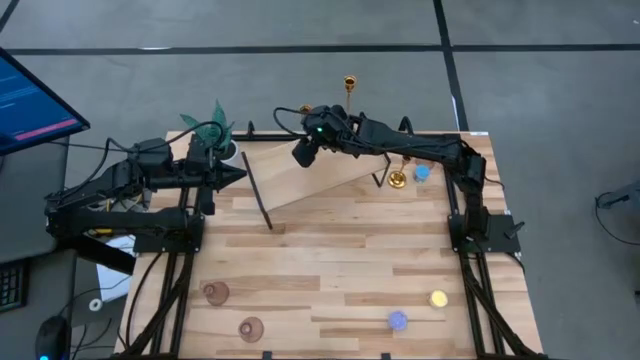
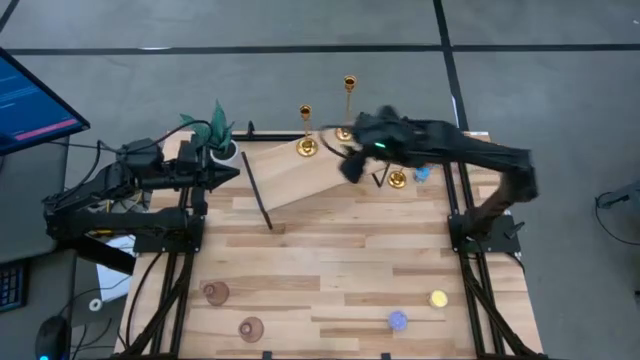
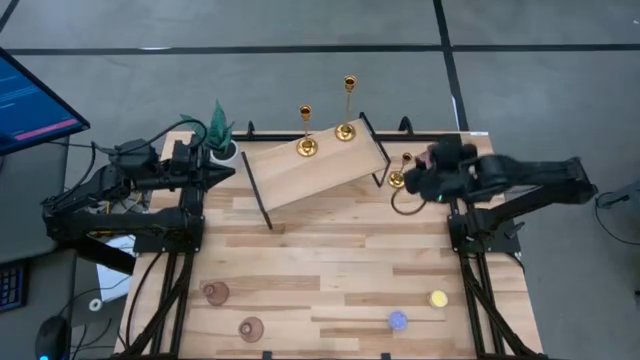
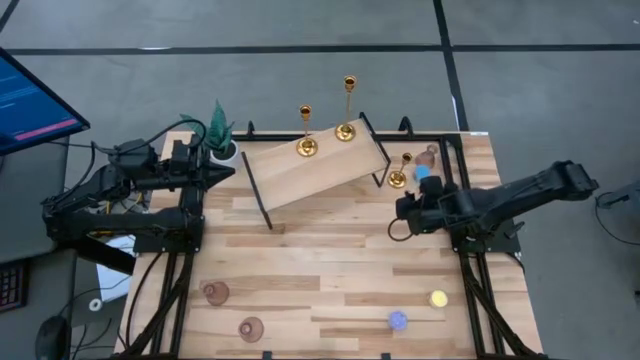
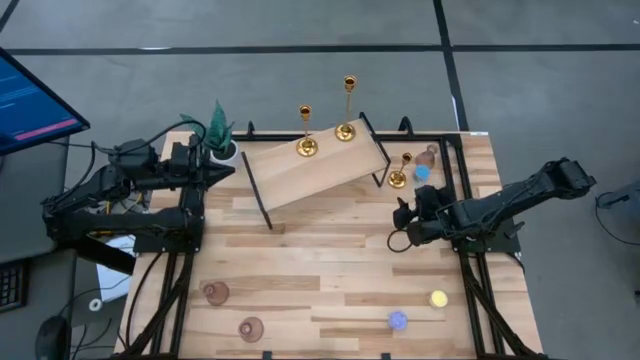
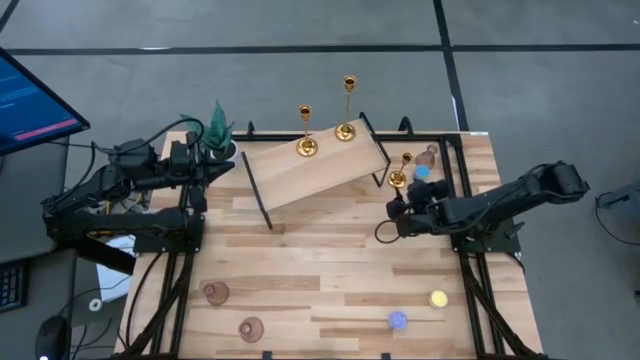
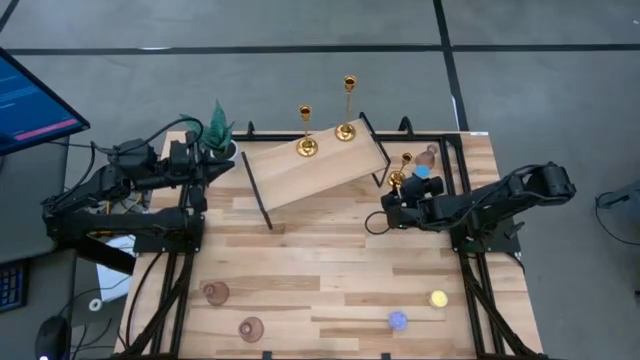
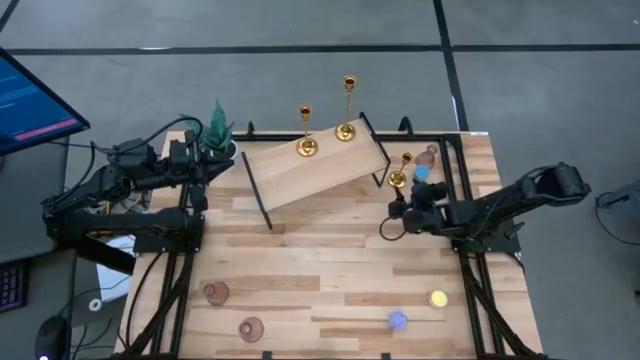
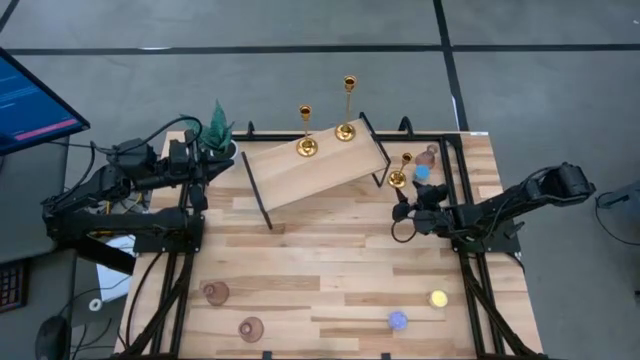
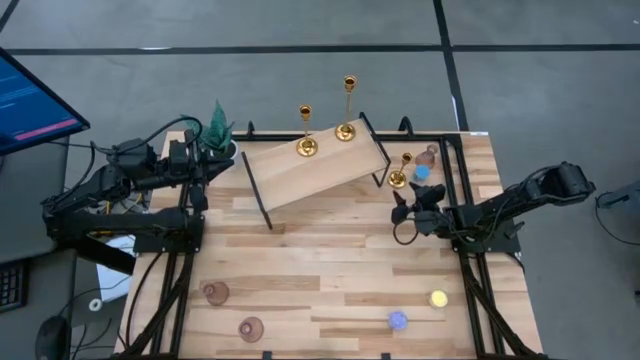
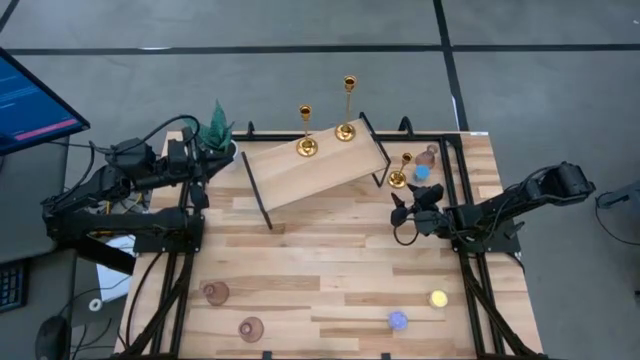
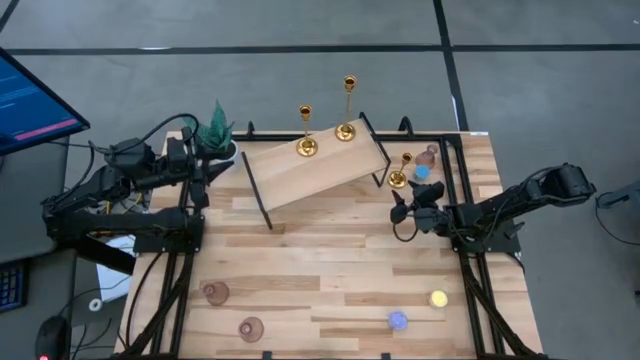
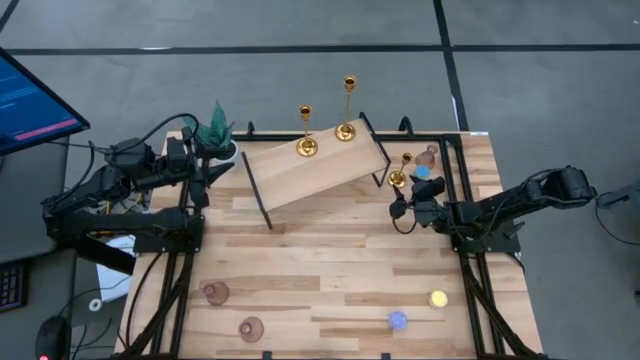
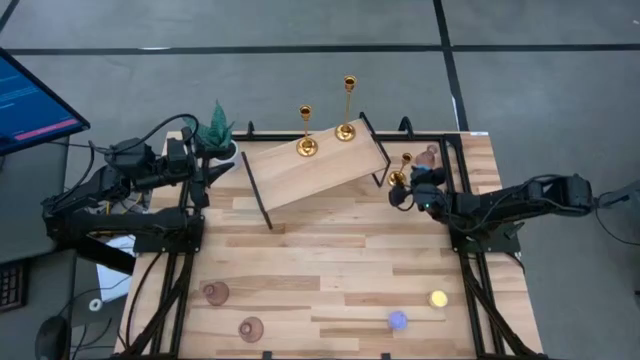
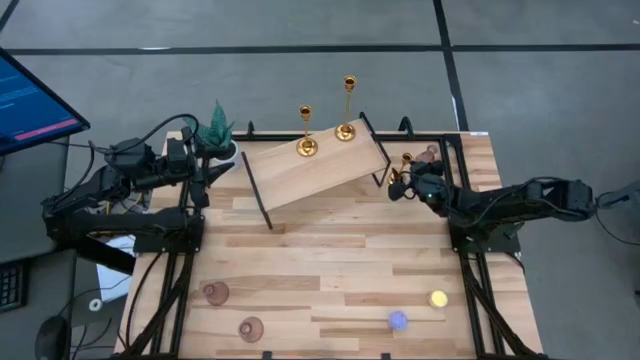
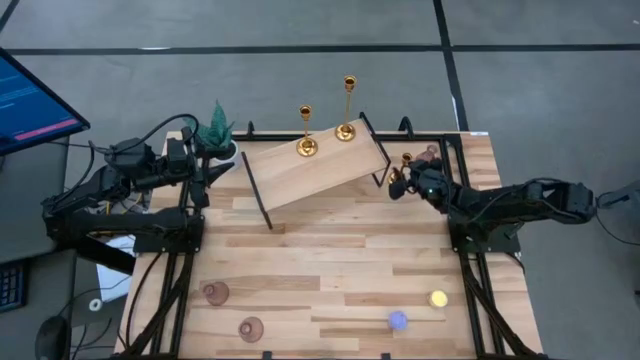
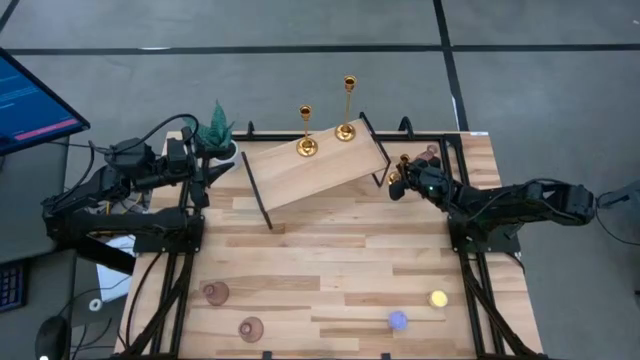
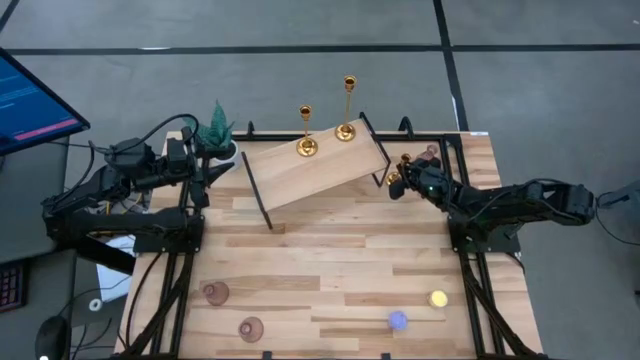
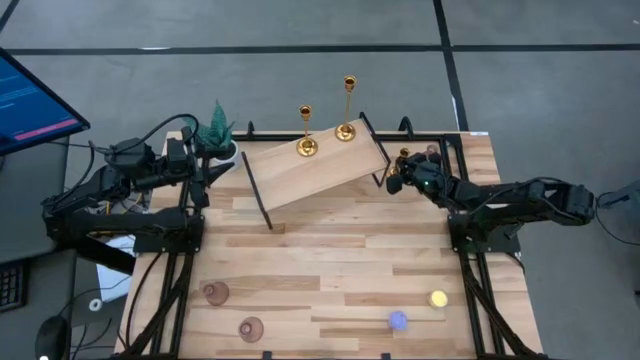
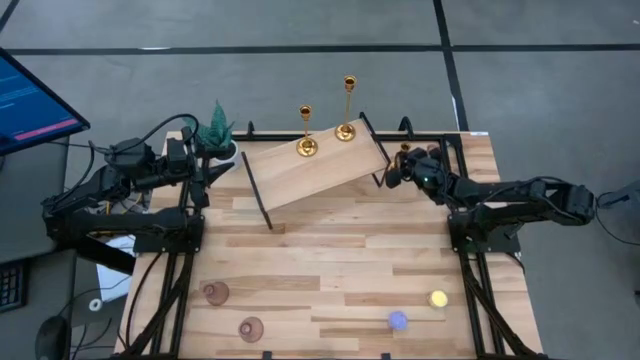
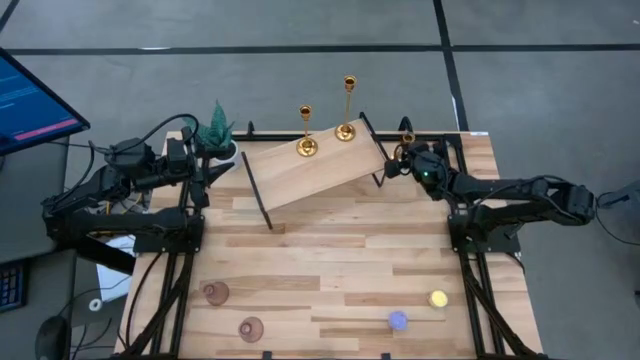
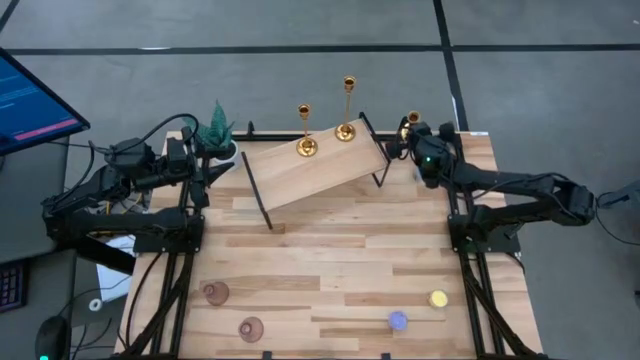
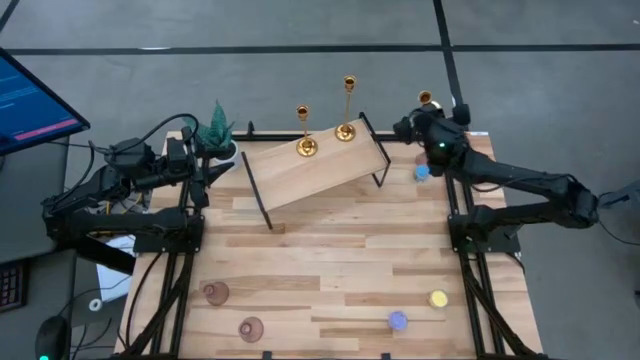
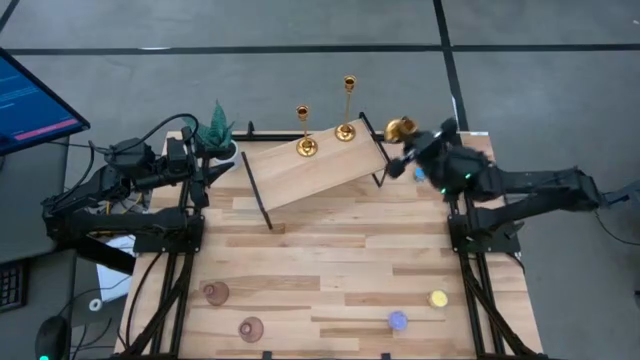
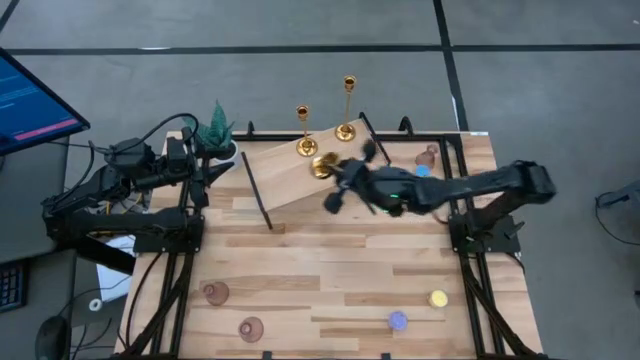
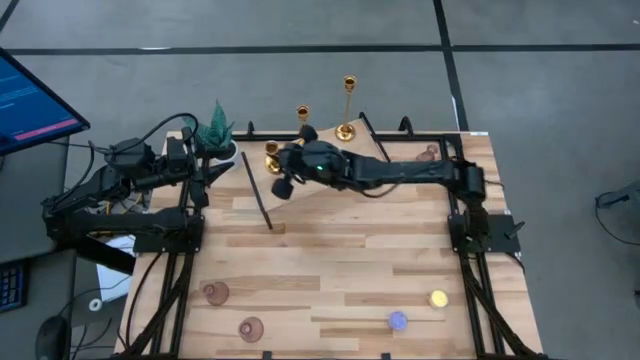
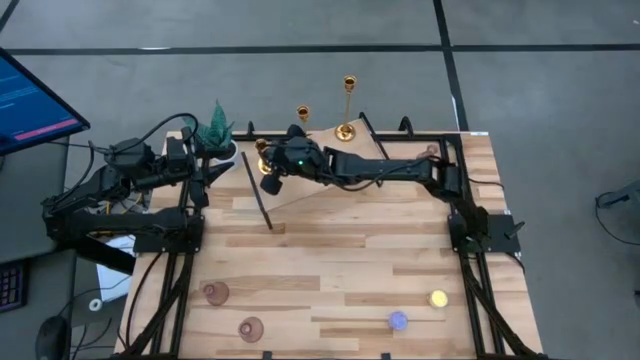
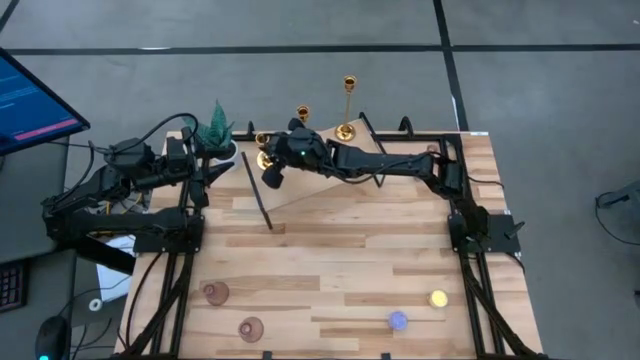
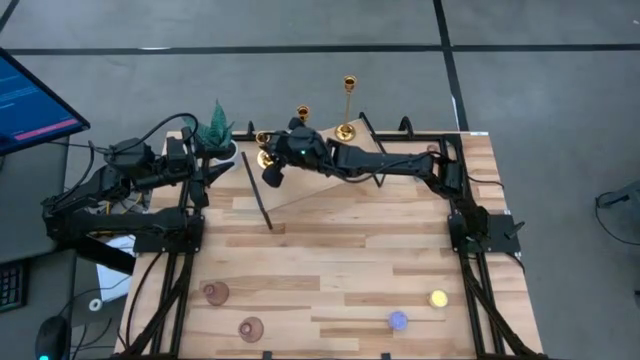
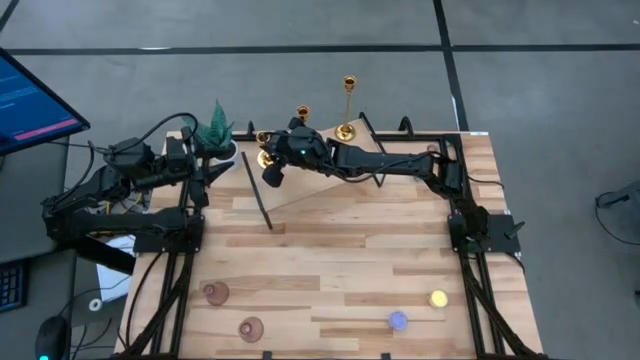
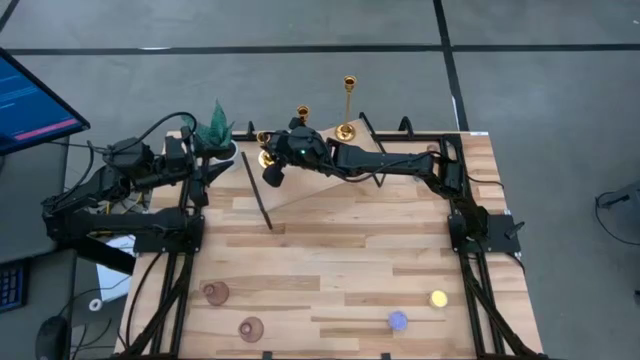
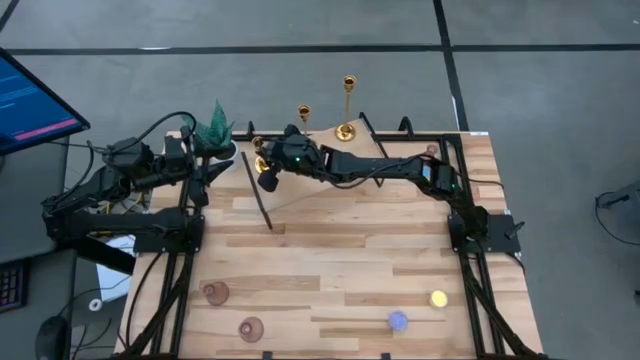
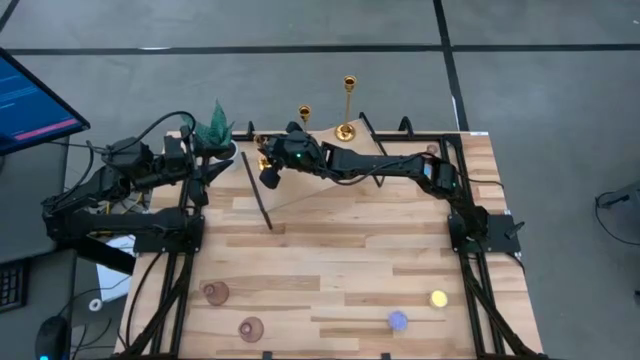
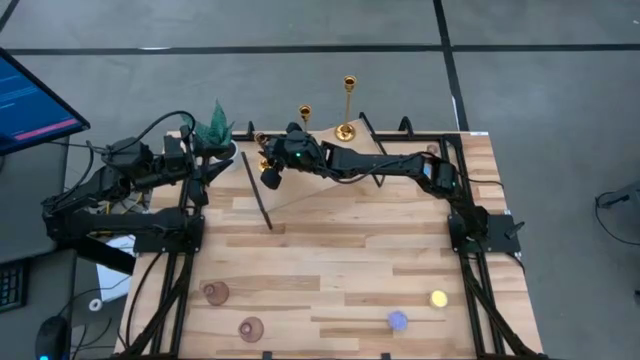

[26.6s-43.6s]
Task: Pick & Place candle stick holders
Put the gold candle holder on the shelf
